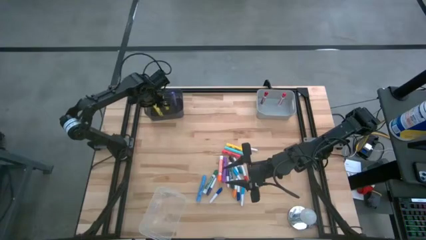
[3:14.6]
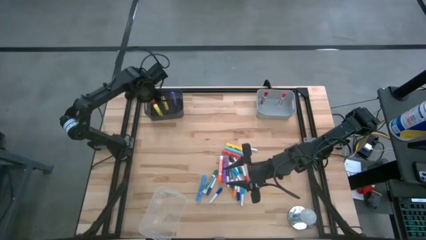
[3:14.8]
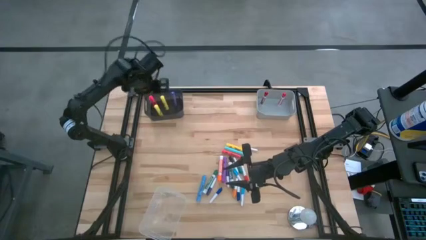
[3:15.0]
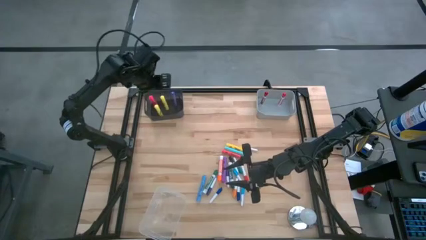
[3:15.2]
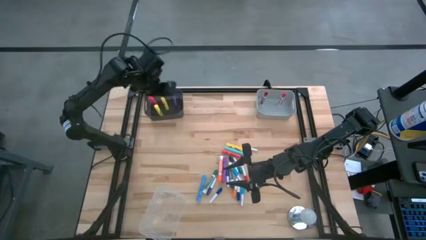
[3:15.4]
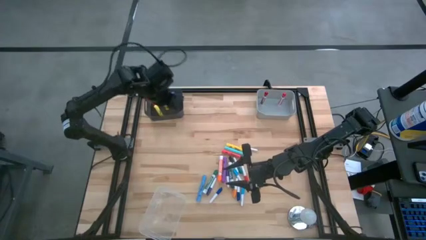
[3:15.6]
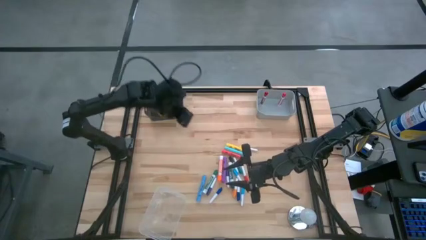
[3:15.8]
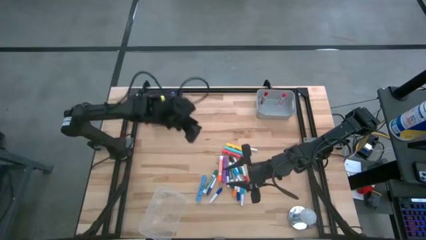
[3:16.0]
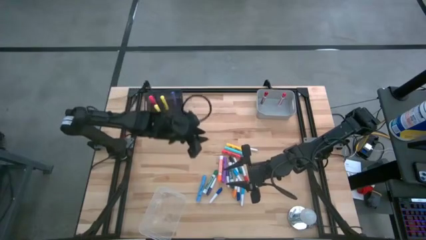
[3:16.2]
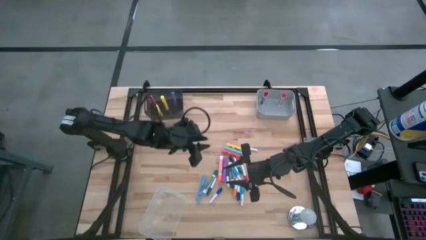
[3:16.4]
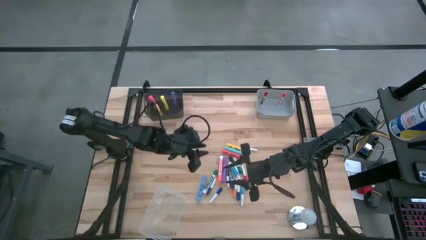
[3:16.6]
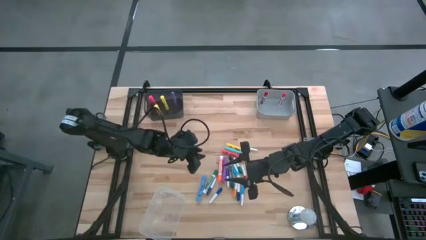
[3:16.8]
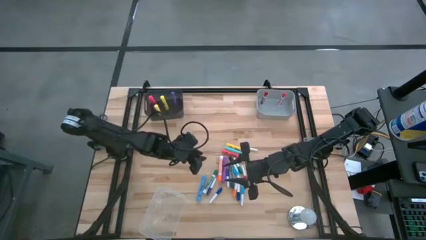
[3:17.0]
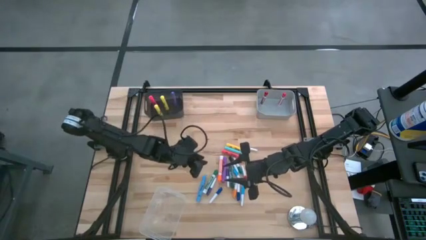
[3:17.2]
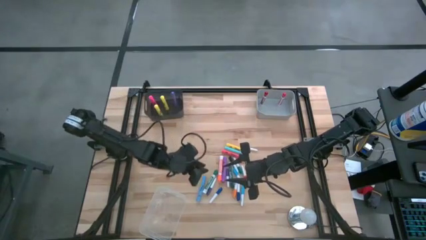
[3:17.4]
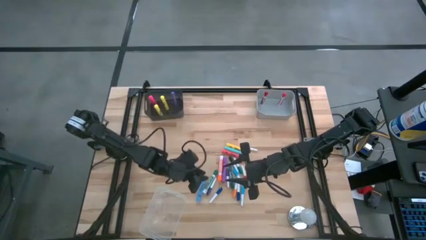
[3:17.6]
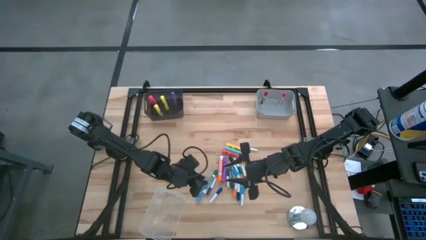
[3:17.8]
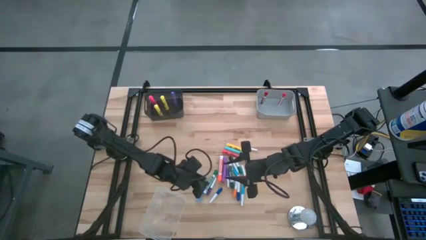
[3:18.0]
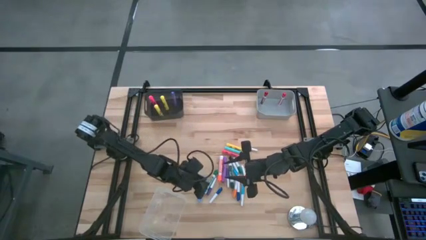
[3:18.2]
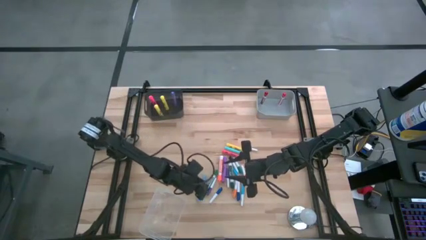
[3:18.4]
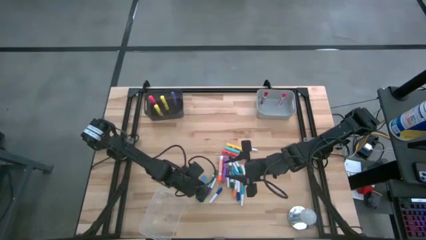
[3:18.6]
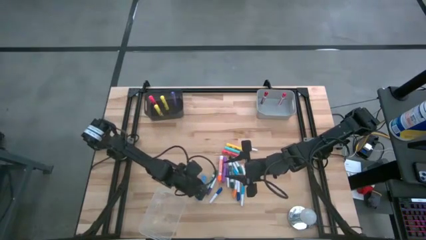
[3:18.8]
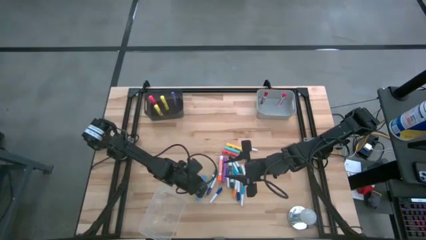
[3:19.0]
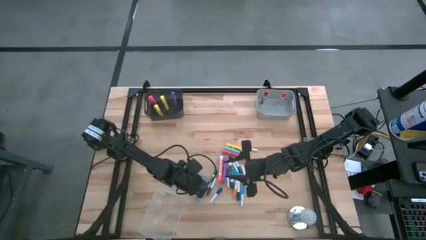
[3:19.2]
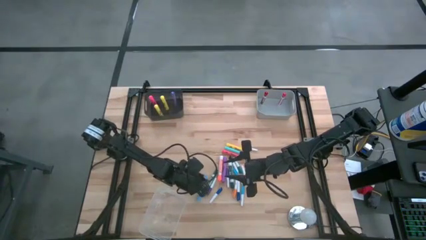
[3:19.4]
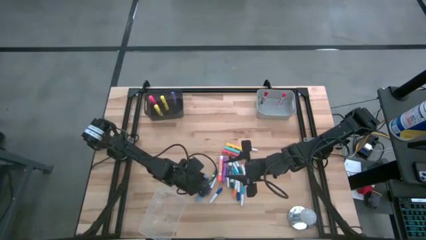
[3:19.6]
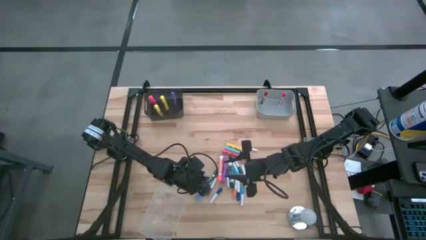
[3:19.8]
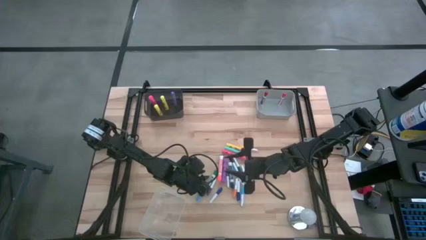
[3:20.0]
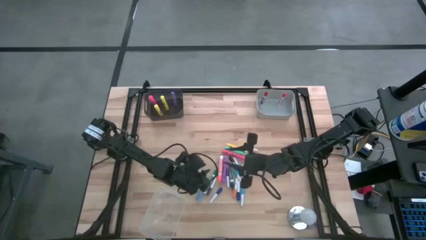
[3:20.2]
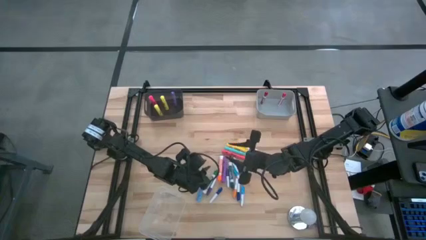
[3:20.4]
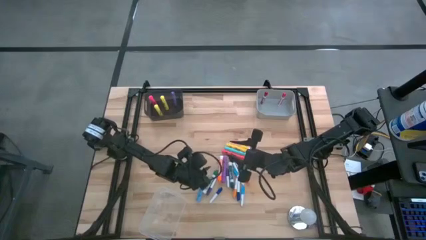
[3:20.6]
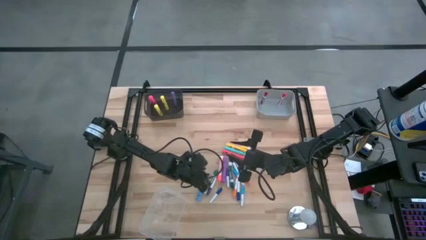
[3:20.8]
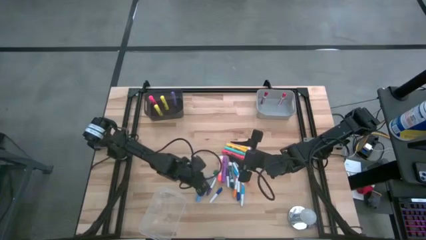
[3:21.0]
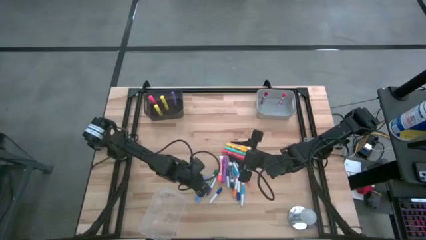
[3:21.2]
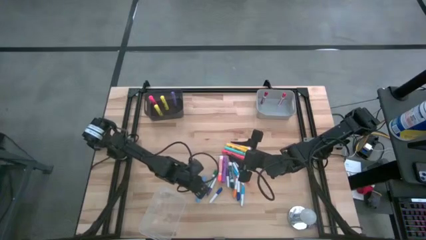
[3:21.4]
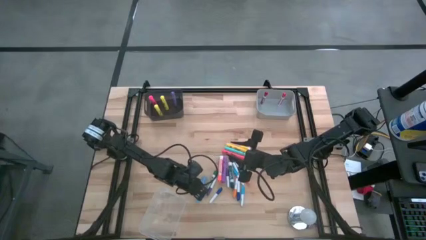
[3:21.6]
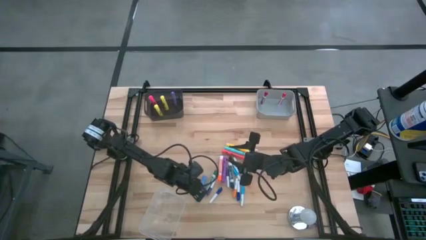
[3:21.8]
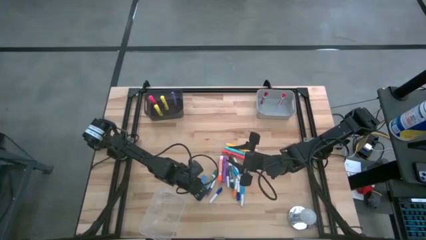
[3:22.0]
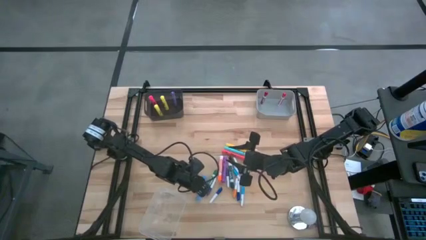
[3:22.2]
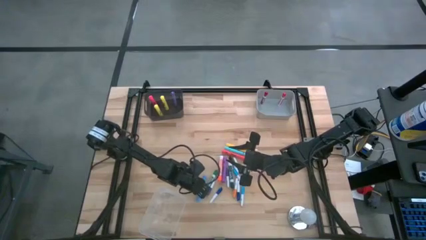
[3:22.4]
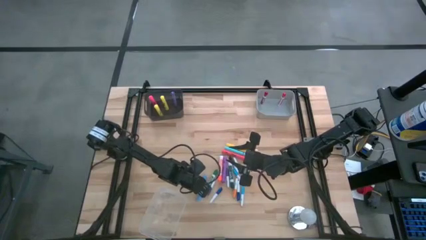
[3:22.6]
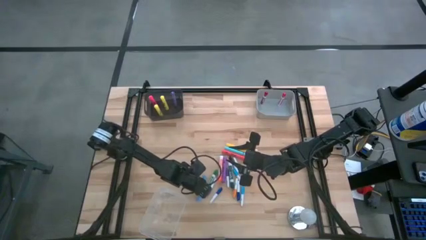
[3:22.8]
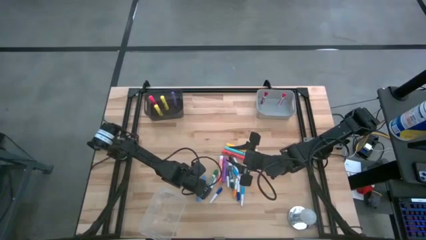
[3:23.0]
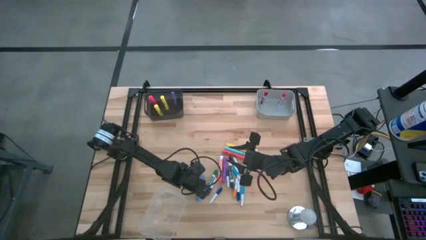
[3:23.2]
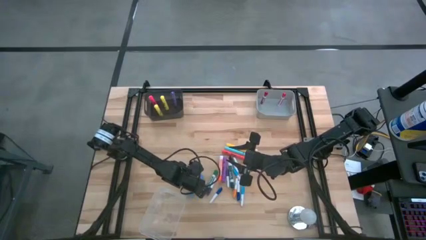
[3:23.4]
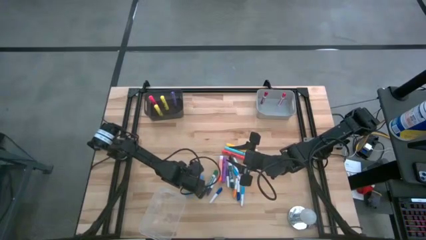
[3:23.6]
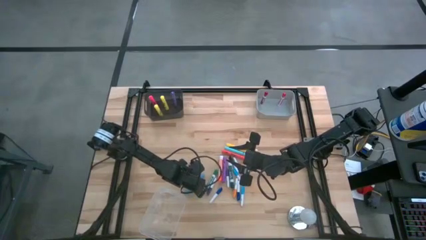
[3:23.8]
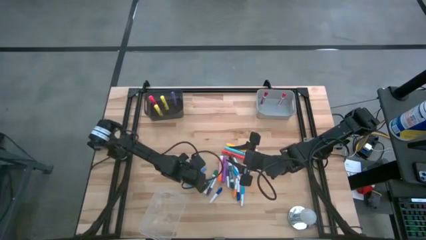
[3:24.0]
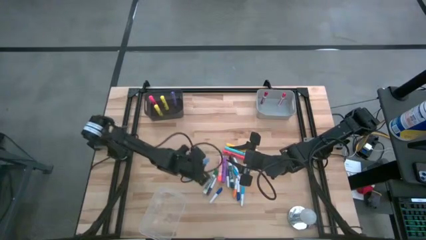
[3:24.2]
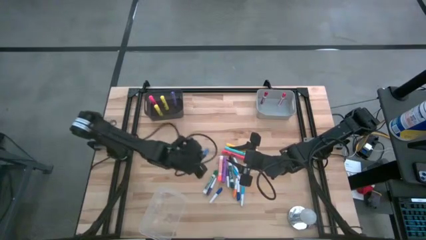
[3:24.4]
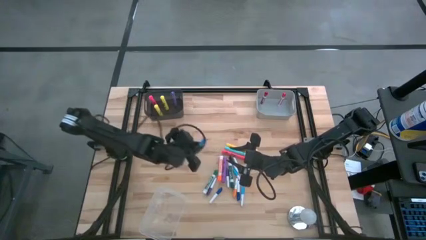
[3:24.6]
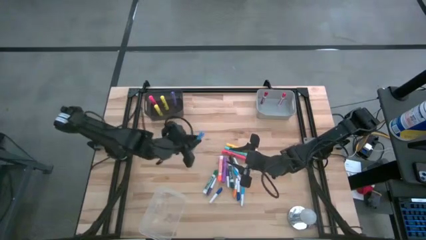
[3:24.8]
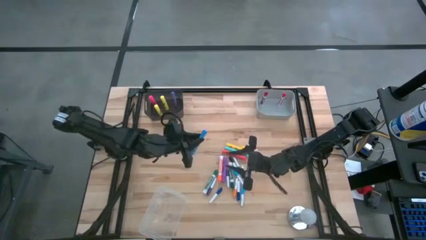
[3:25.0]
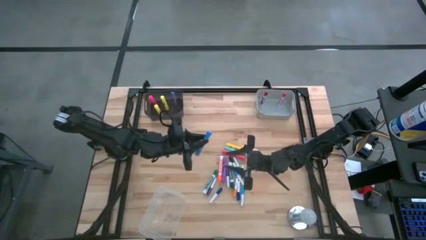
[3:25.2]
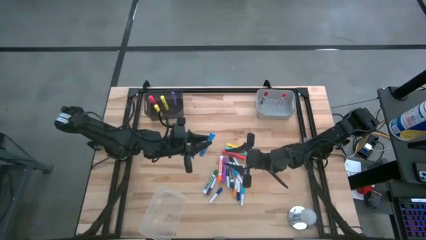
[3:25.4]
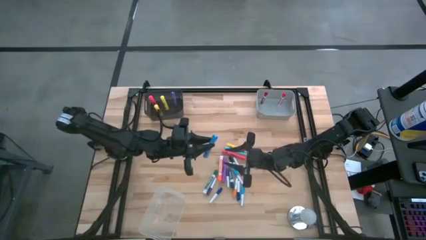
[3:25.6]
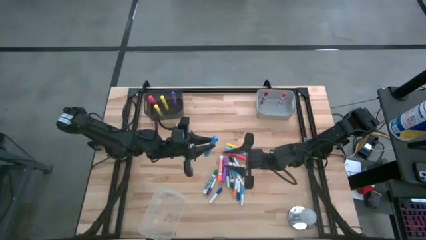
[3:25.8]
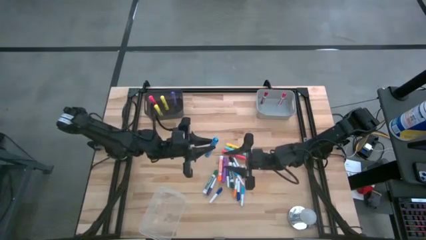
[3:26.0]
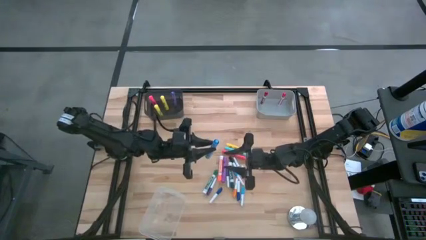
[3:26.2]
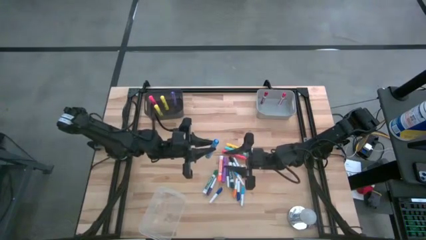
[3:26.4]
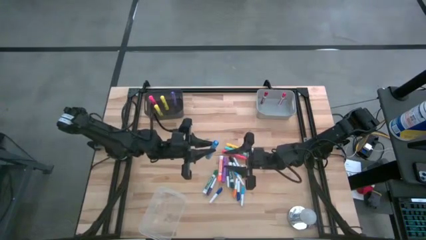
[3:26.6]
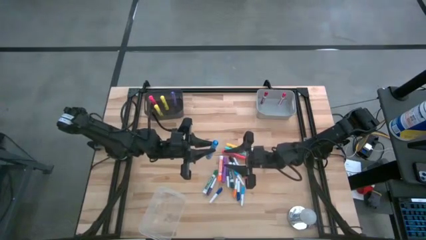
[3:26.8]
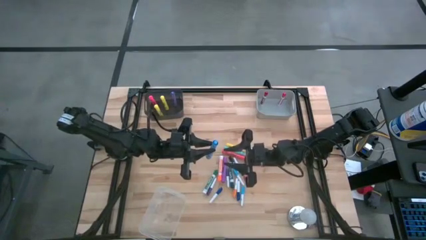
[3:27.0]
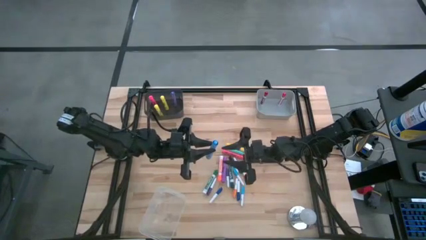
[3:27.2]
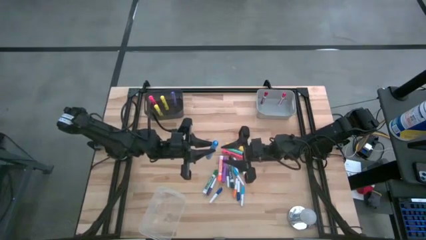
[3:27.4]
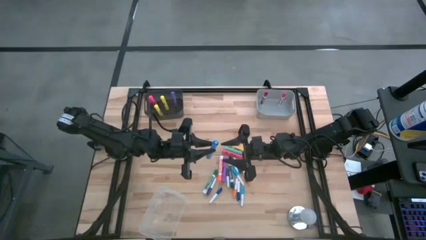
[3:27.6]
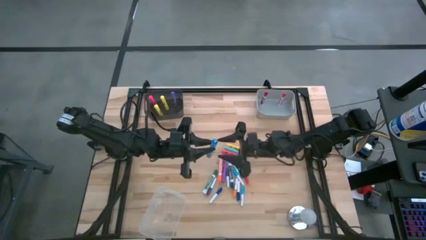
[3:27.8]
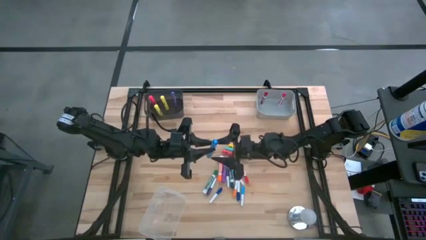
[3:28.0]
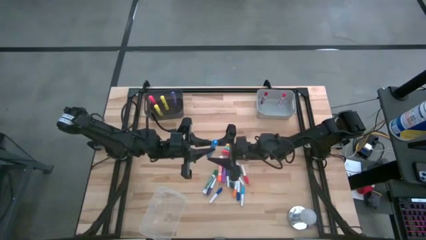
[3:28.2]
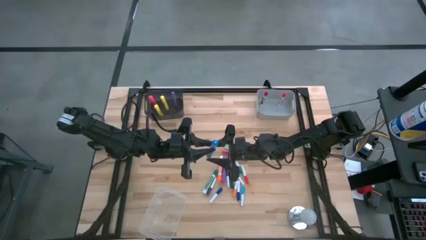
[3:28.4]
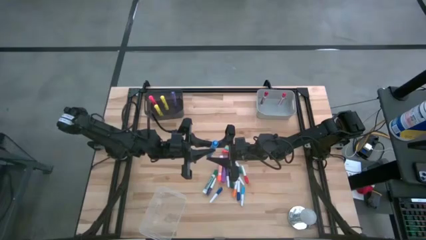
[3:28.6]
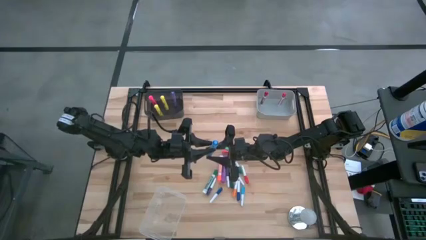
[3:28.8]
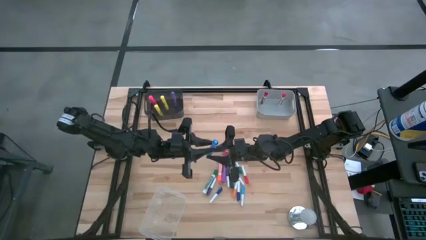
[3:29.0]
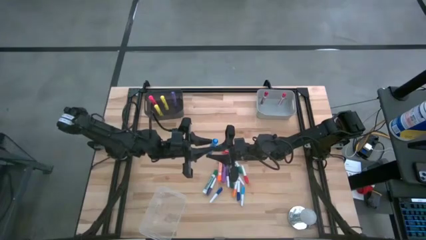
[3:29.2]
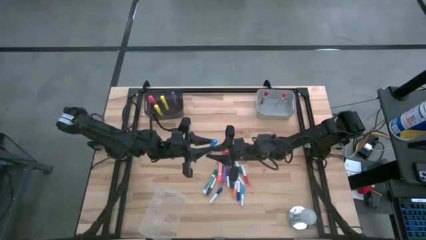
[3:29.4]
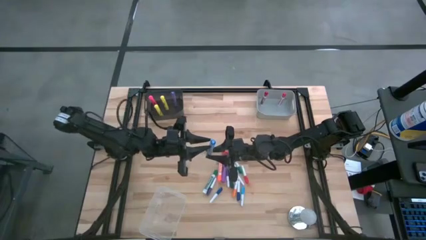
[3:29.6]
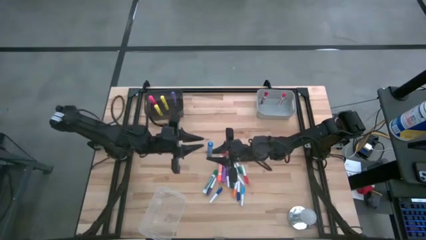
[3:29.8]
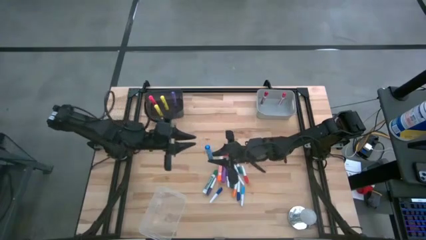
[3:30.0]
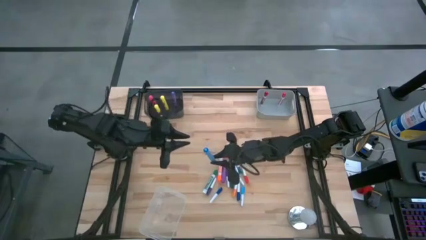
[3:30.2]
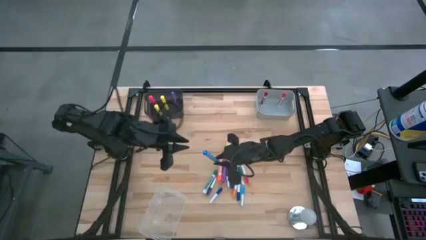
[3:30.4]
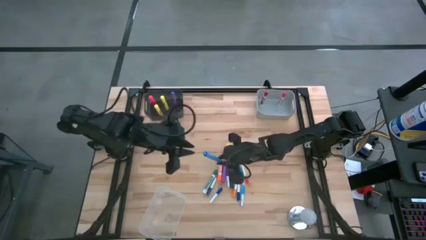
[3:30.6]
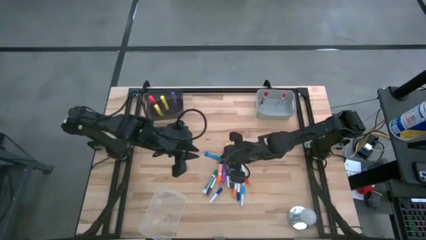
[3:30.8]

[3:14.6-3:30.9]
Task: Pick & Place Markers
Put the blue highlighter pen into the black bin
